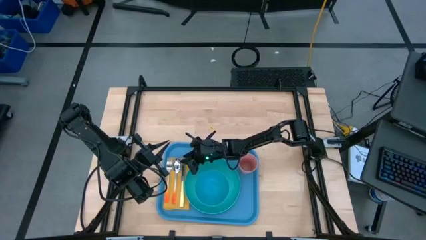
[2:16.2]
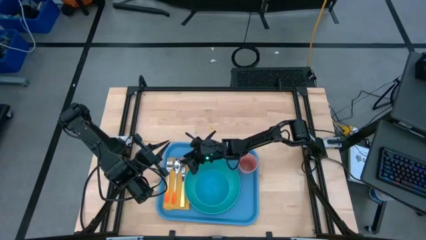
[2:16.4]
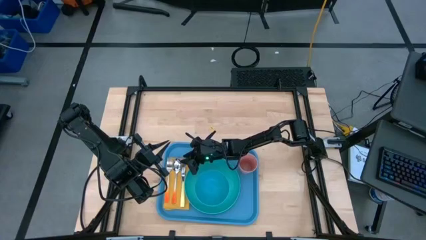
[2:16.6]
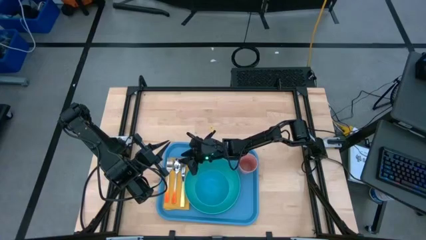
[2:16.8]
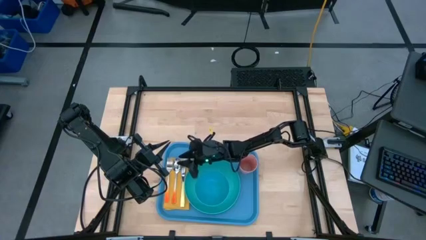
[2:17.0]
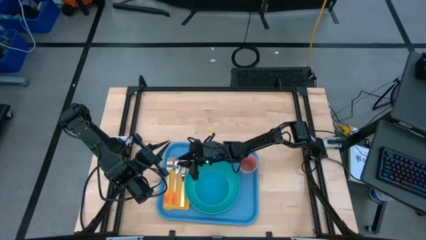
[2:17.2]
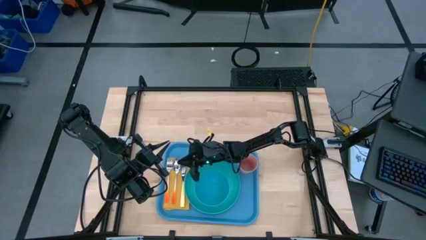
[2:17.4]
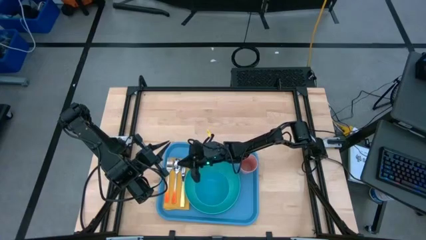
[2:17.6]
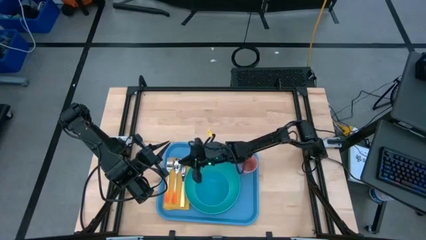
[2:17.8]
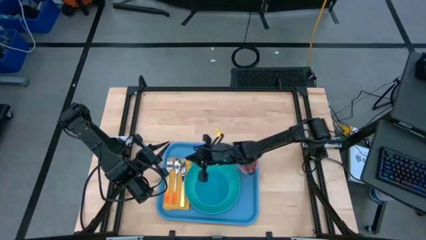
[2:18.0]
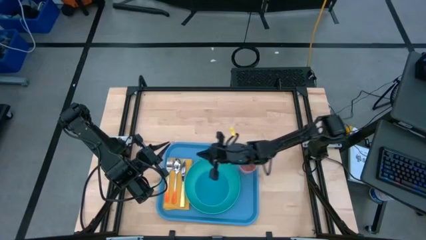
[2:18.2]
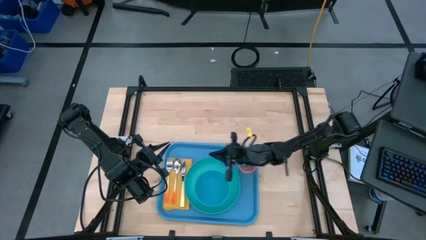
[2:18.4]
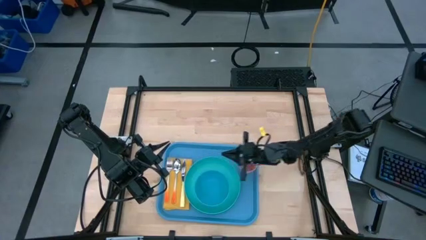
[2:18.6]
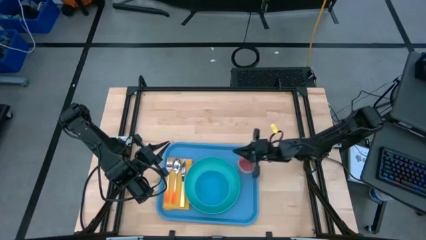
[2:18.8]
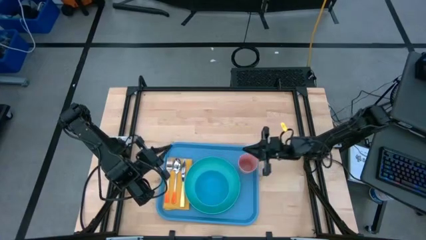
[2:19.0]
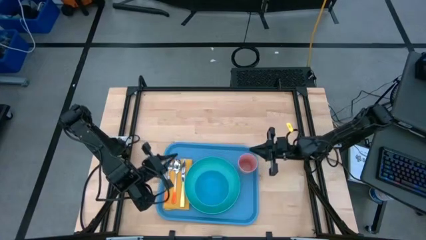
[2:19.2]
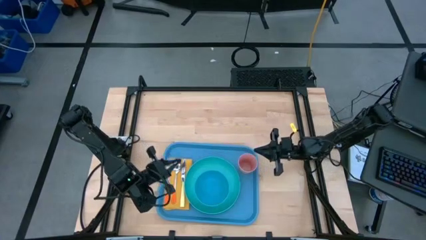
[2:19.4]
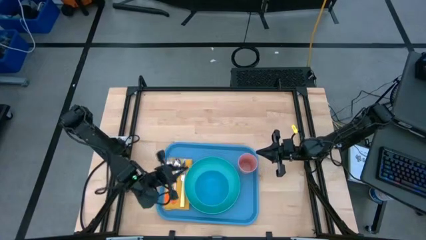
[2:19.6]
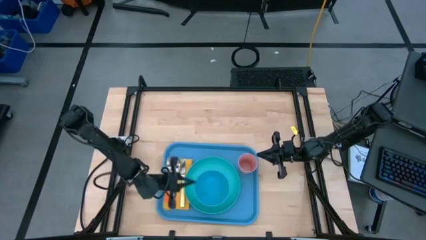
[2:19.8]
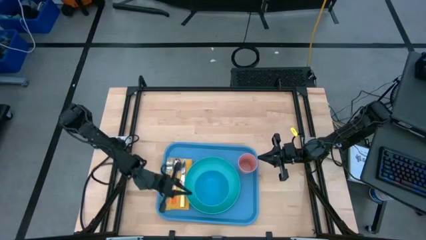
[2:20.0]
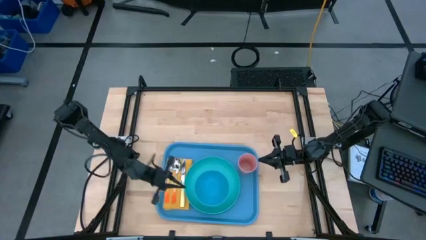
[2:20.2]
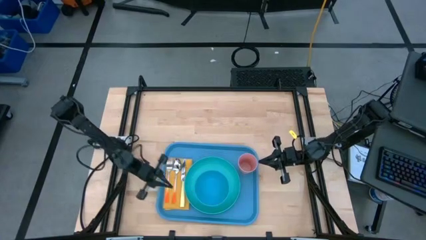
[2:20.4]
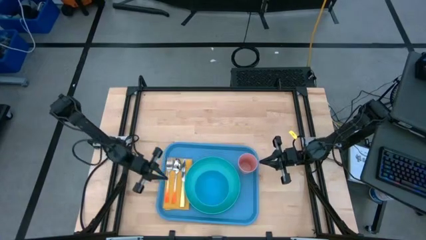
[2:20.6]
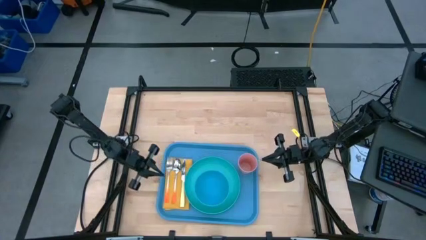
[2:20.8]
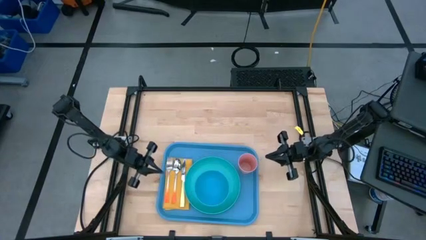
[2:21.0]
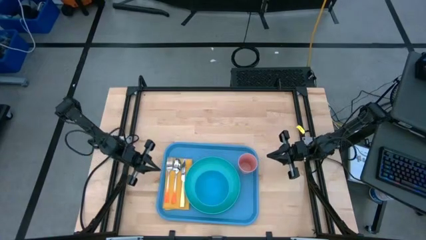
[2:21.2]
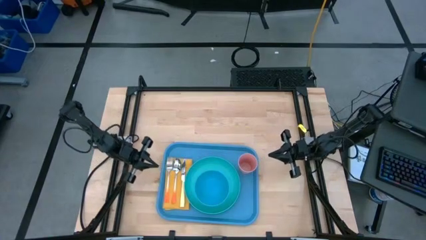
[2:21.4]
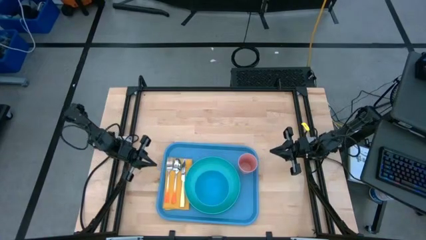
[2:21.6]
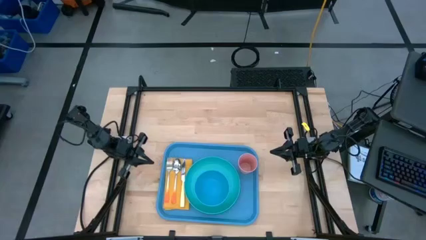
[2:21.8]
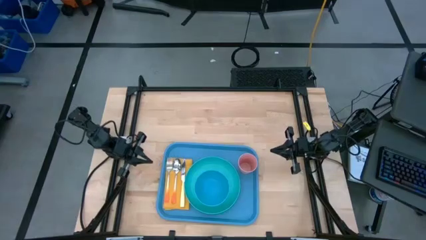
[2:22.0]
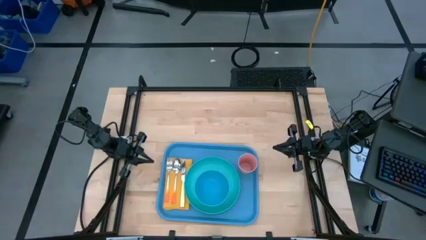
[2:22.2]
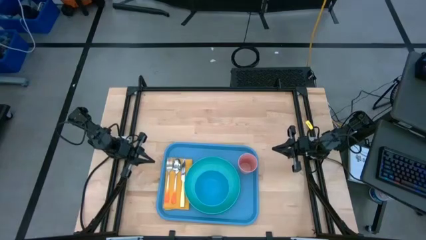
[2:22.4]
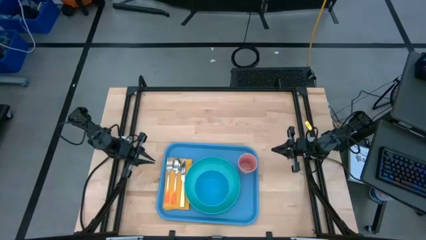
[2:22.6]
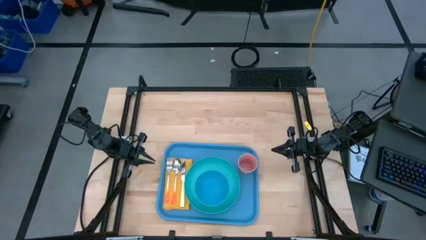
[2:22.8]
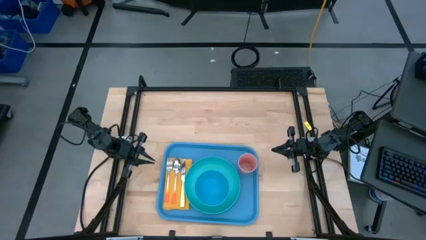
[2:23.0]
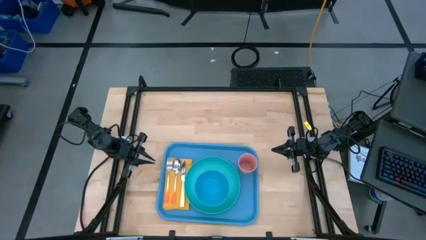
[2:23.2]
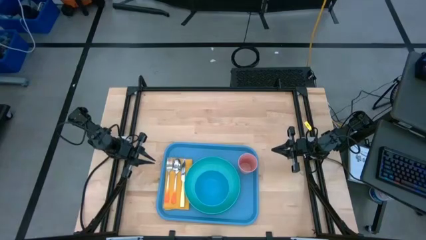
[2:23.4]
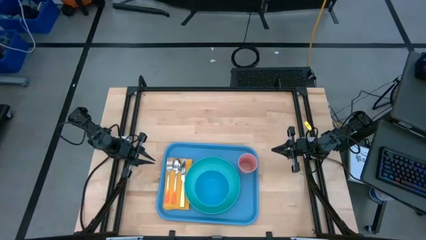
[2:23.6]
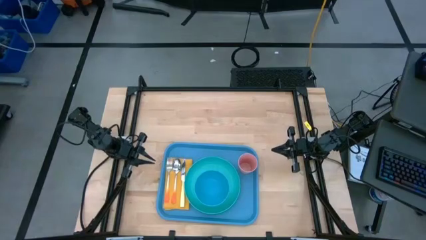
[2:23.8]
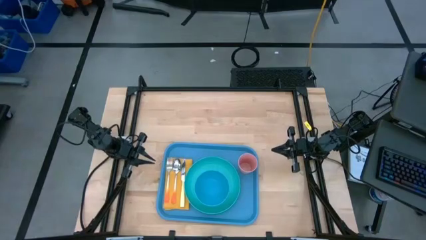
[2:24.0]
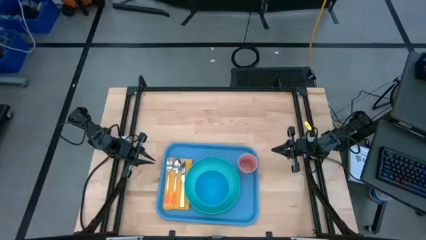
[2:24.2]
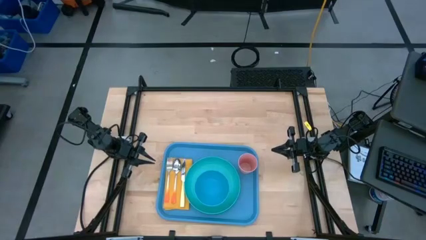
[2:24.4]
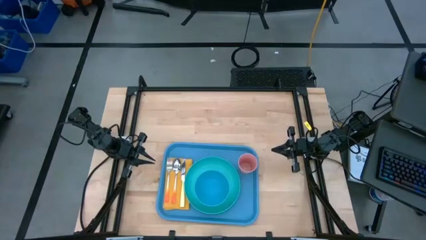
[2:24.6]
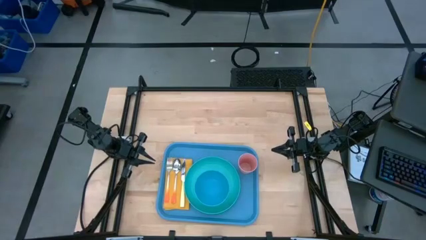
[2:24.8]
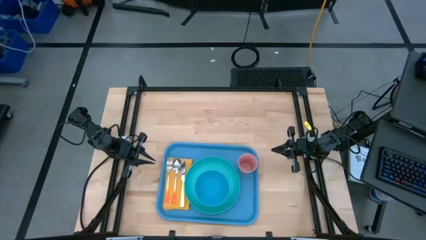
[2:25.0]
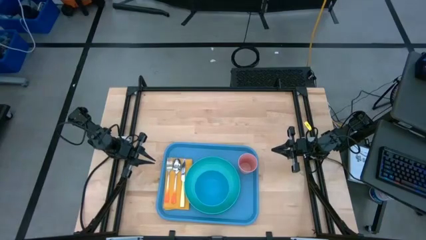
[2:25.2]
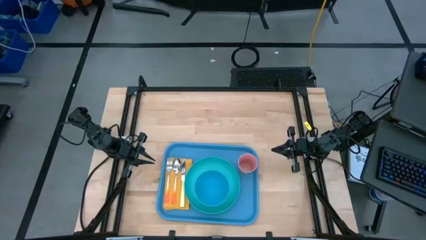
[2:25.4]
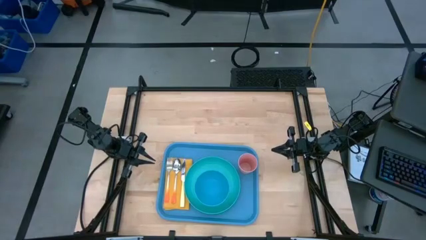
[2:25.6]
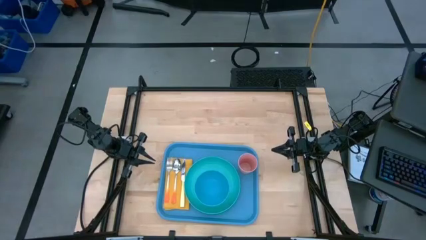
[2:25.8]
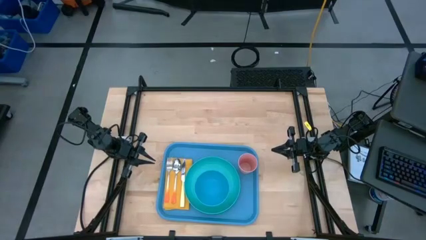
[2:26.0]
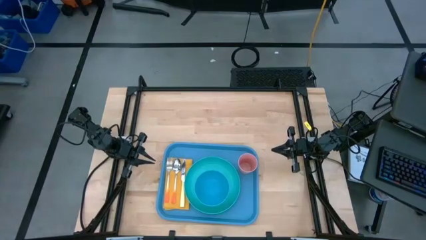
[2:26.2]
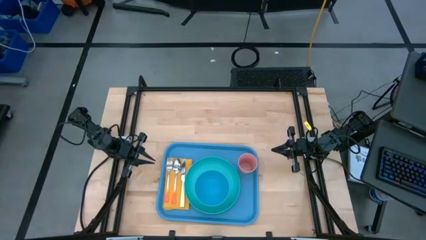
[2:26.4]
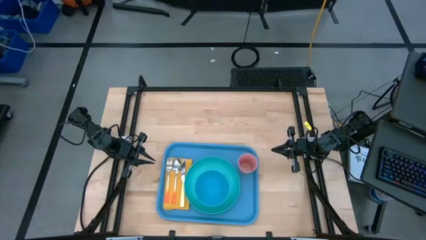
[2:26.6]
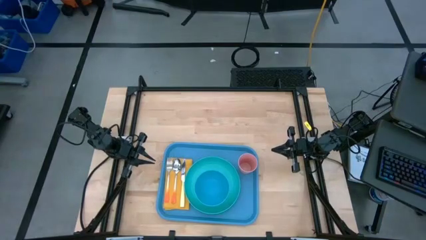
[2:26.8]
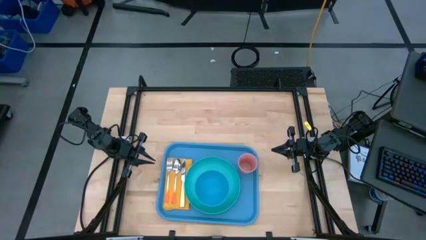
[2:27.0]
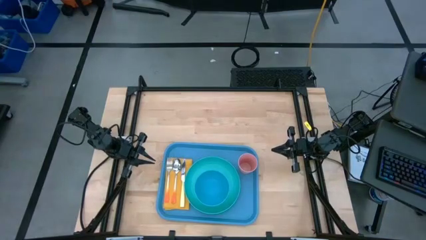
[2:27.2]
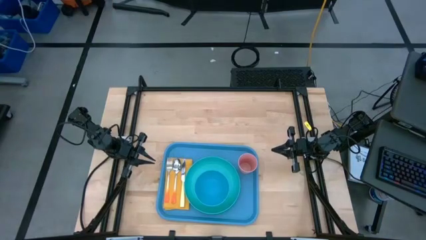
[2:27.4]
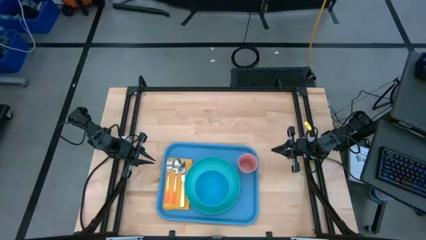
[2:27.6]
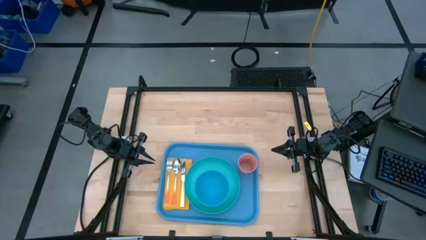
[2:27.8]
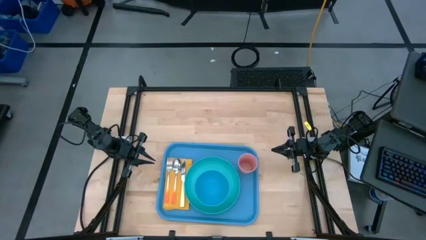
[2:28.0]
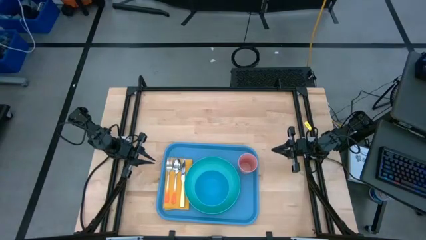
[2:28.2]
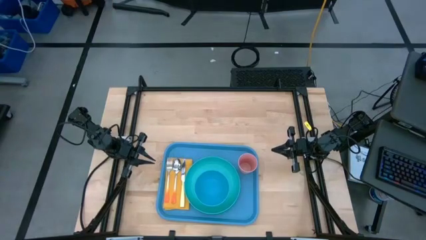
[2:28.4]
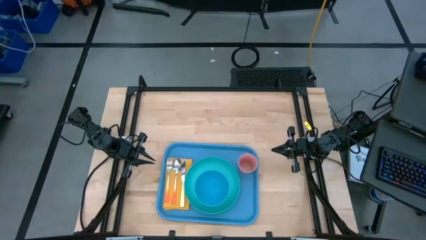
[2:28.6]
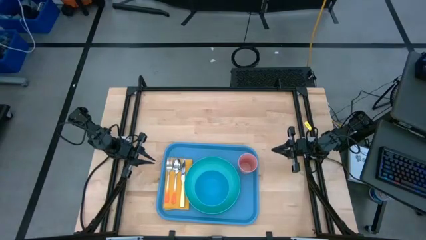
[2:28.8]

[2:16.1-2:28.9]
Task: Set up tray
Return to Home Position
